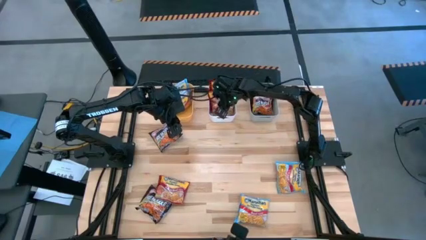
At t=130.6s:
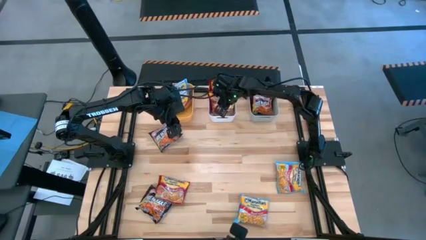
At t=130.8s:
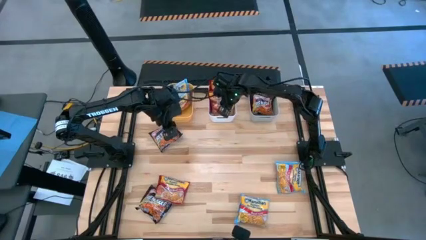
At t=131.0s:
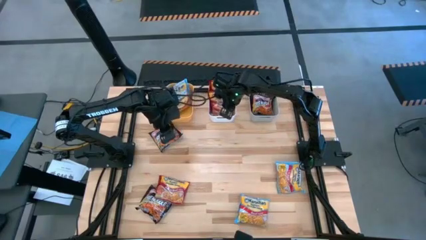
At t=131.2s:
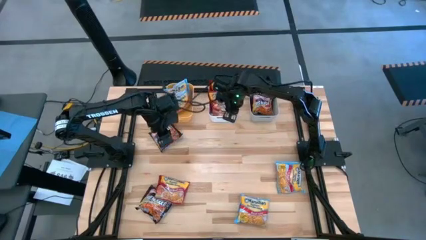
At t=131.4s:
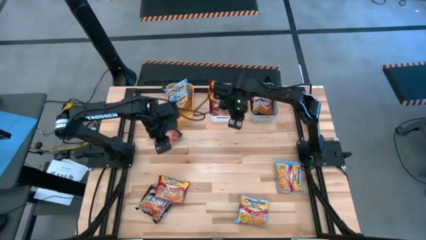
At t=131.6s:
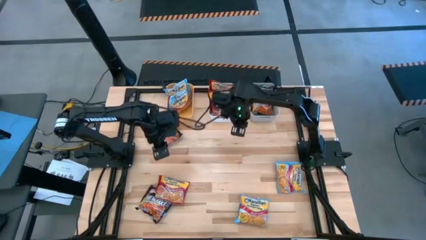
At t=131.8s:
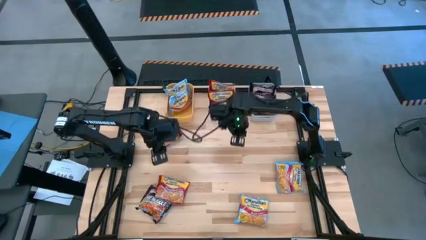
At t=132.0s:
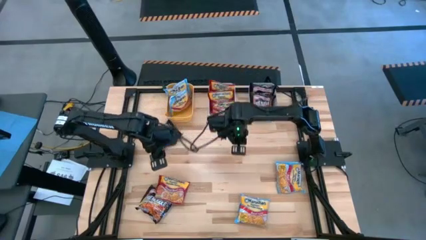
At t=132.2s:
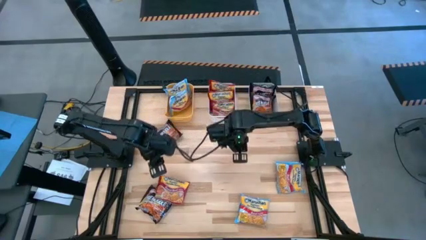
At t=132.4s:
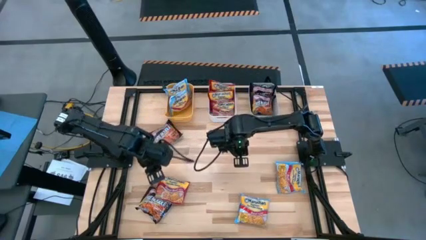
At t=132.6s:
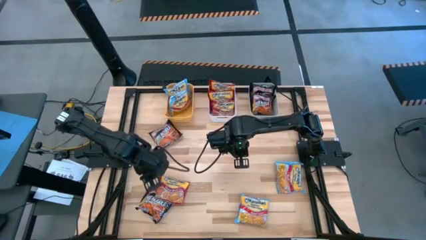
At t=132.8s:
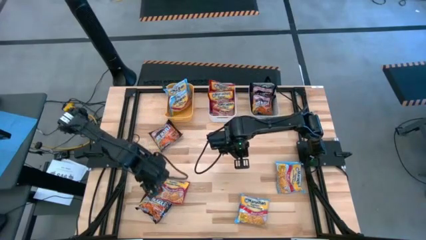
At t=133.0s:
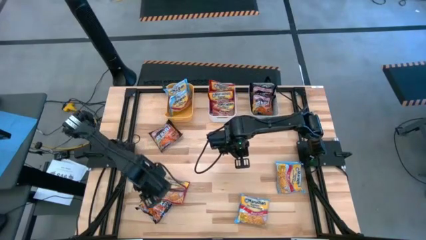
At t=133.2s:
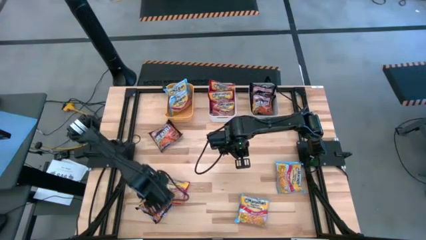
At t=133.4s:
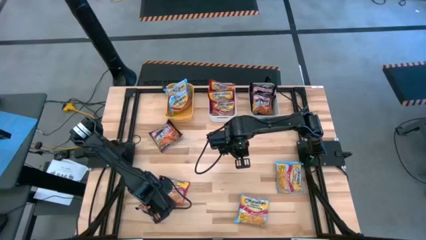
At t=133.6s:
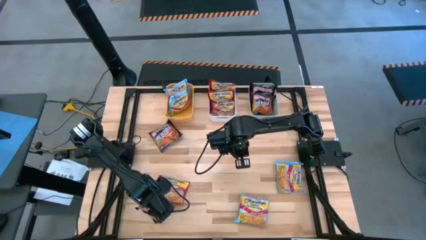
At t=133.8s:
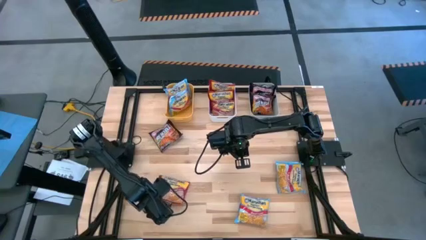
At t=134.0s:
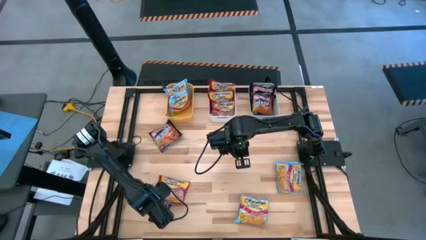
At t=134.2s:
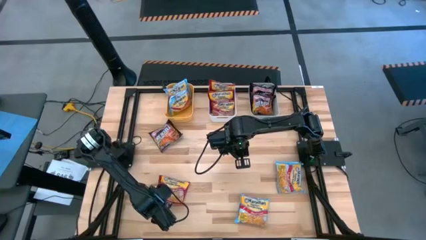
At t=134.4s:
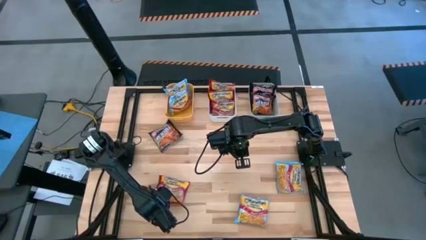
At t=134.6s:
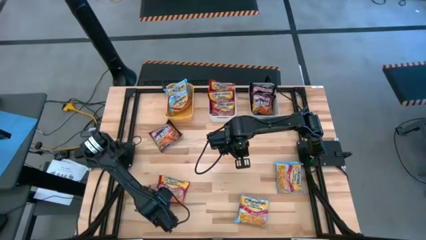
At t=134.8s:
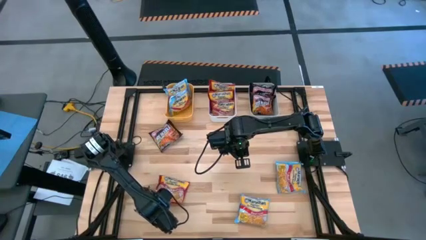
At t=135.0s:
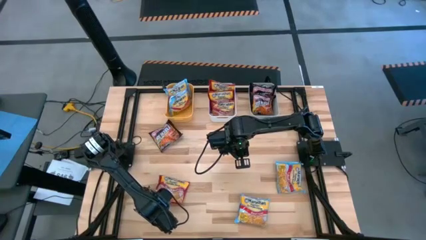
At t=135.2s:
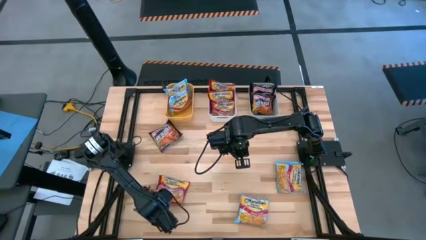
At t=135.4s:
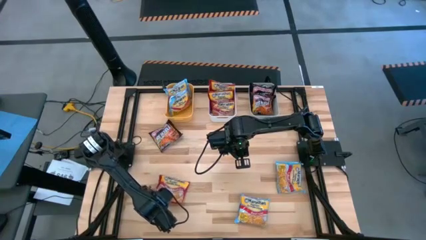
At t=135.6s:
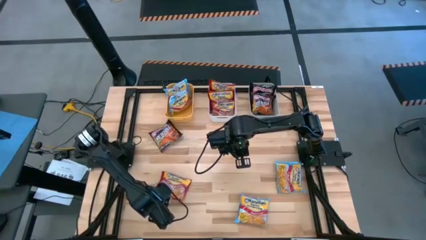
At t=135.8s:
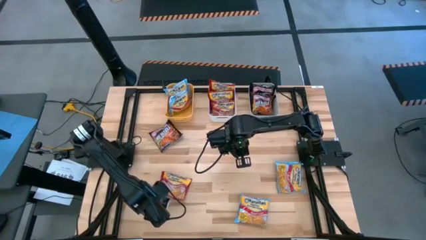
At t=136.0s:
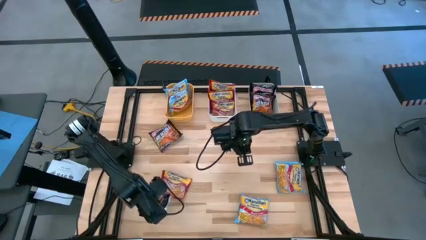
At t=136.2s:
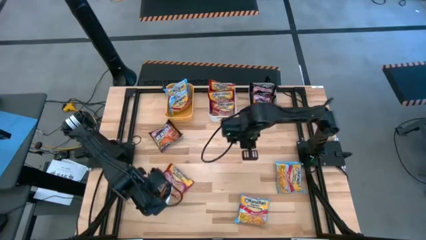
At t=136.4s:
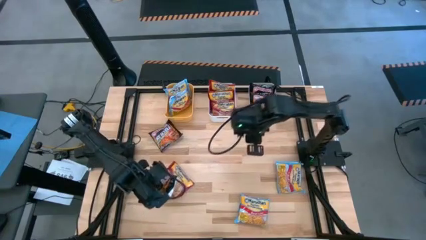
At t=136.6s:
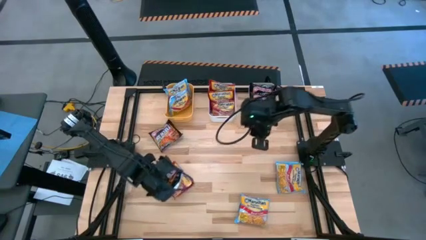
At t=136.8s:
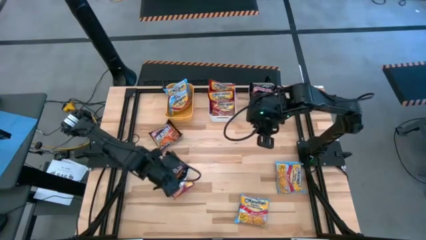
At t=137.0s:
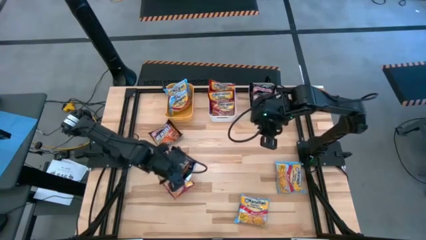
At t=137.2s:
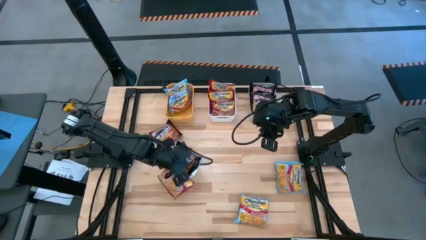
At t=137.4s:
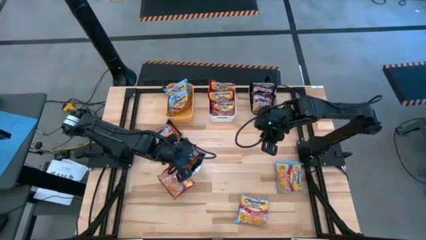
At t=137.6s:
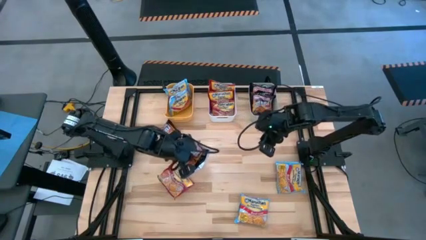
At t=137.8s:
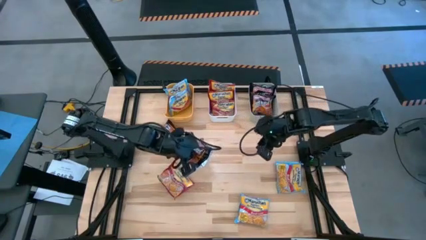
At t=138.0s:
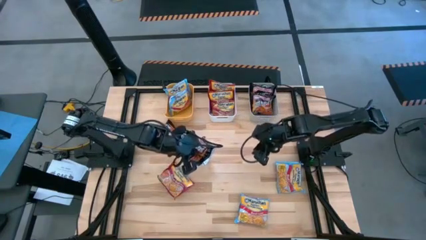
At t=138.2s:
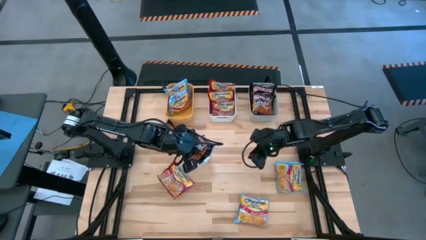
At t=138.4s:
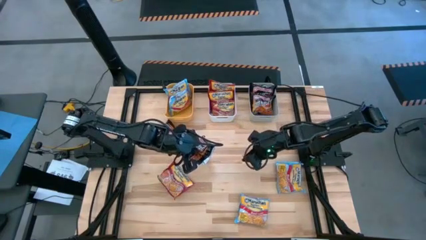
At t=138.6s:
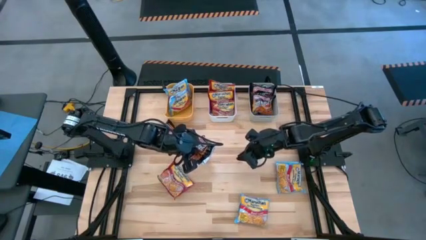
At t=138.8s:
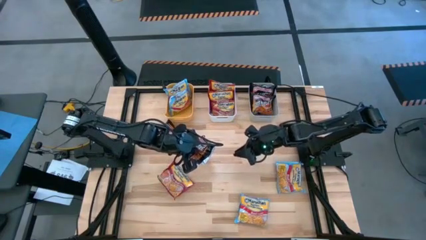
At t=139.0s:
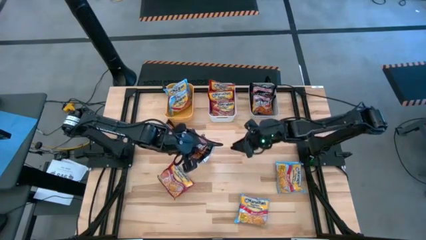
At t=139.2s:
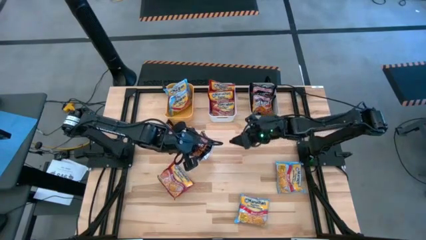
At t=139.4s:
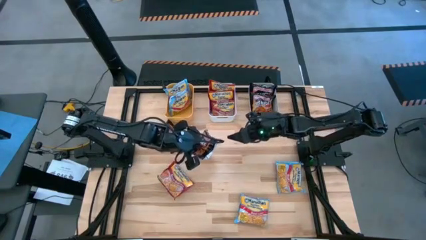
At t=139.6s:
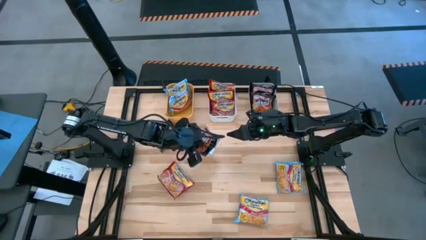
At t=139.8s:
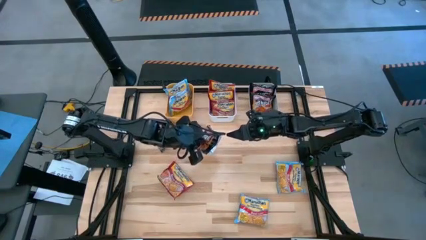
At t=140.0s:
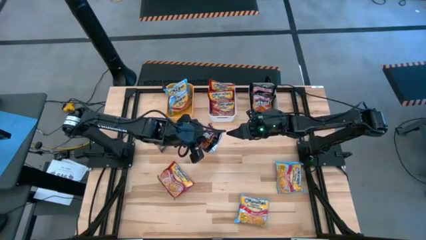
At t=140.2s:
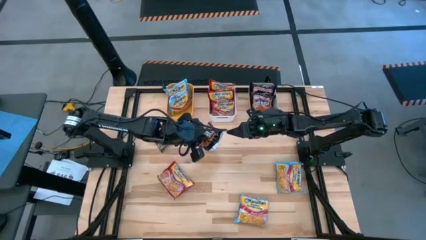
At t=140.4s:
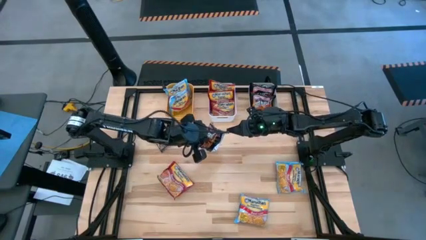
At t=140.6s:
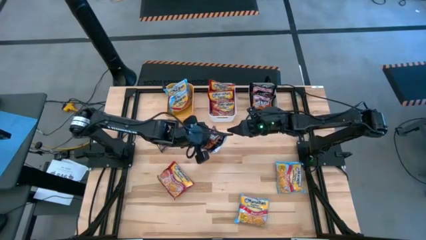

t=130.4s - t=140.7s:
Task: Sort Maruchan noodles
Put the black noodle pack into the gray bin

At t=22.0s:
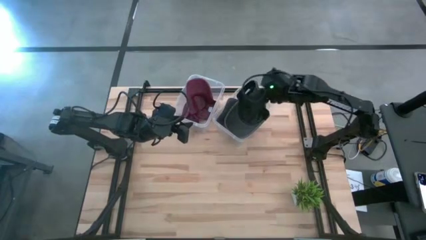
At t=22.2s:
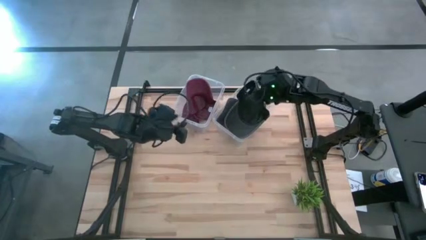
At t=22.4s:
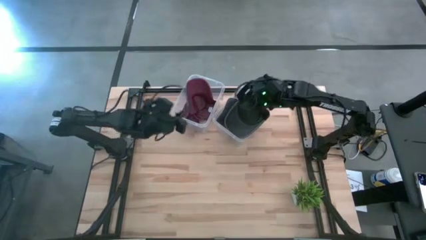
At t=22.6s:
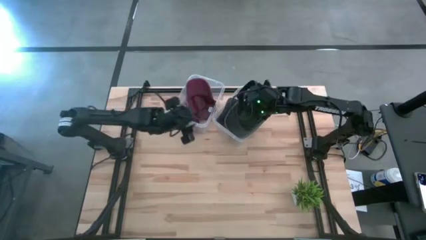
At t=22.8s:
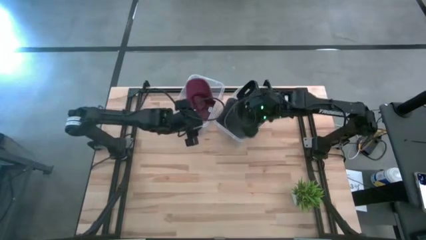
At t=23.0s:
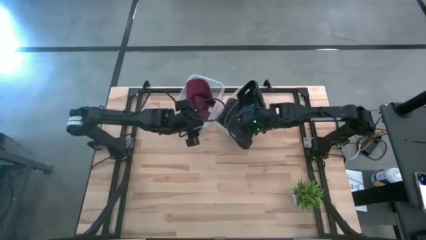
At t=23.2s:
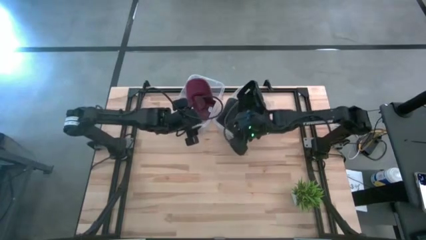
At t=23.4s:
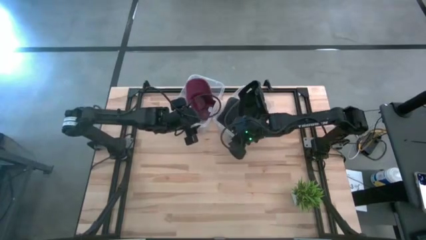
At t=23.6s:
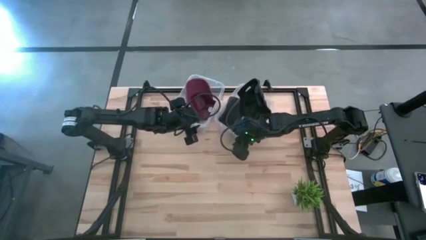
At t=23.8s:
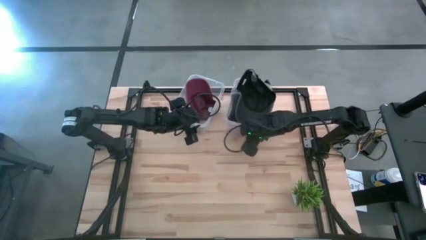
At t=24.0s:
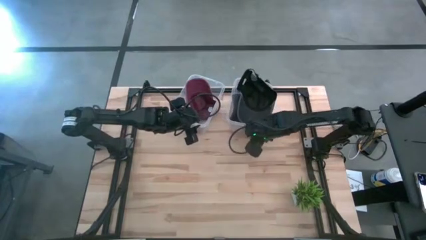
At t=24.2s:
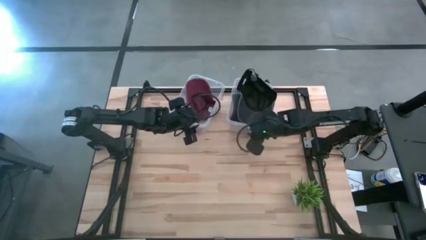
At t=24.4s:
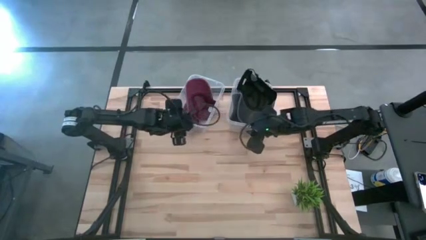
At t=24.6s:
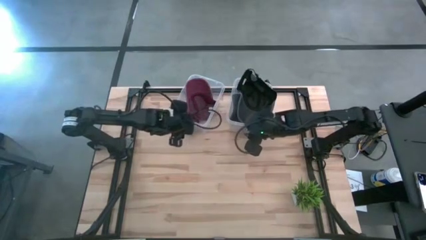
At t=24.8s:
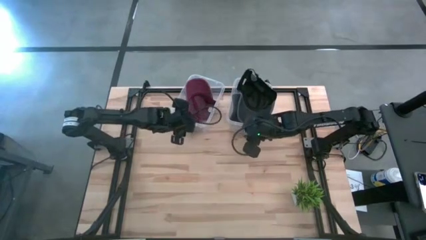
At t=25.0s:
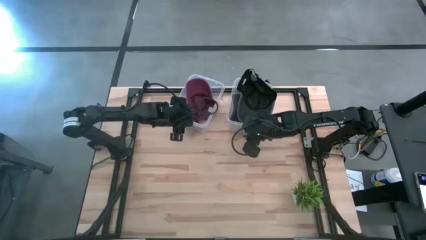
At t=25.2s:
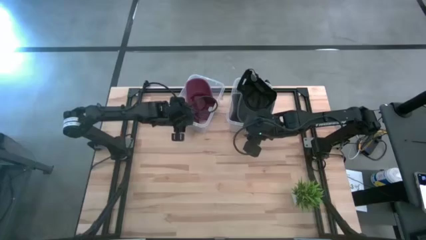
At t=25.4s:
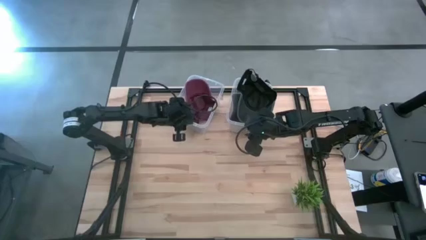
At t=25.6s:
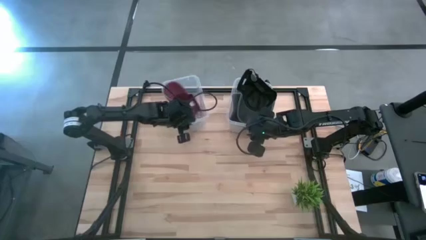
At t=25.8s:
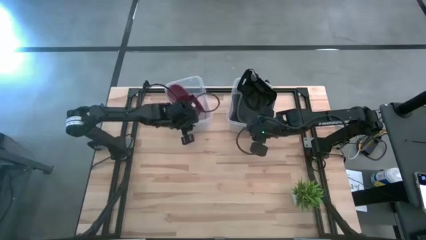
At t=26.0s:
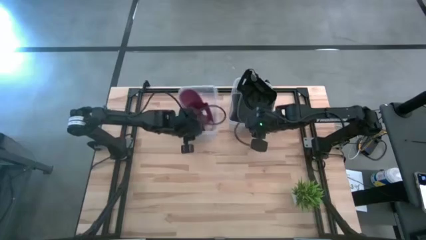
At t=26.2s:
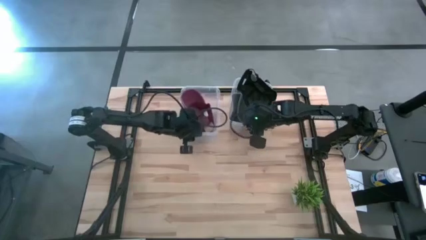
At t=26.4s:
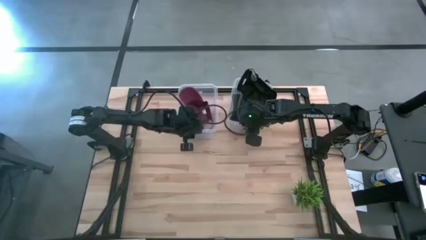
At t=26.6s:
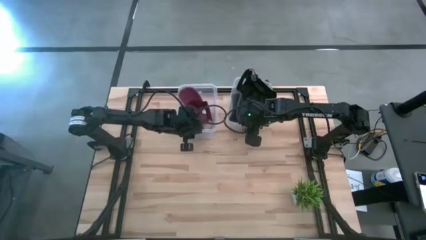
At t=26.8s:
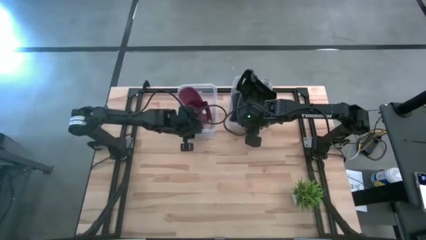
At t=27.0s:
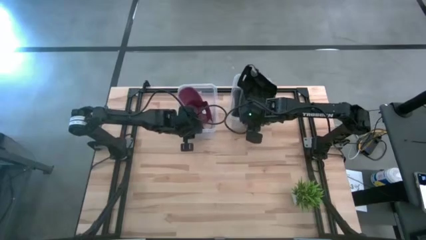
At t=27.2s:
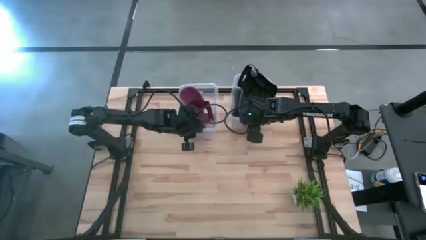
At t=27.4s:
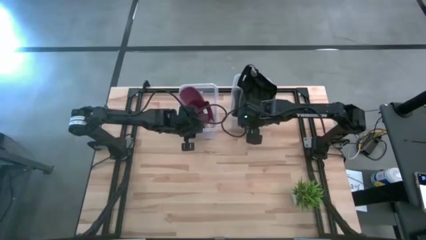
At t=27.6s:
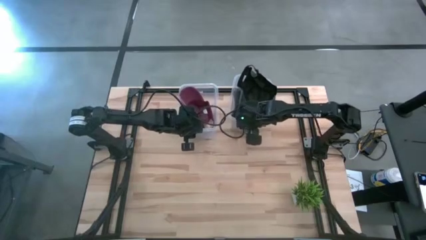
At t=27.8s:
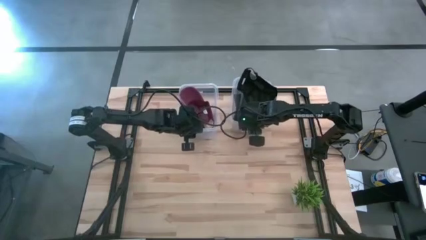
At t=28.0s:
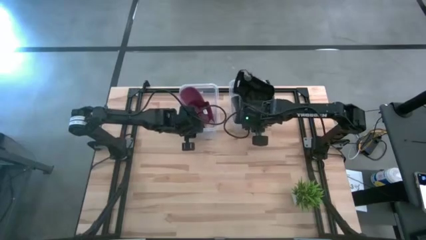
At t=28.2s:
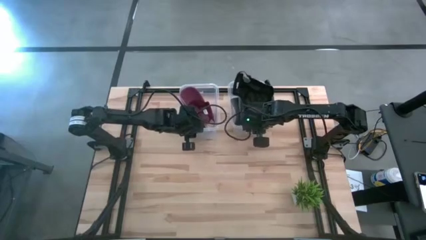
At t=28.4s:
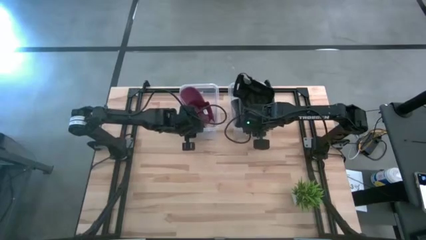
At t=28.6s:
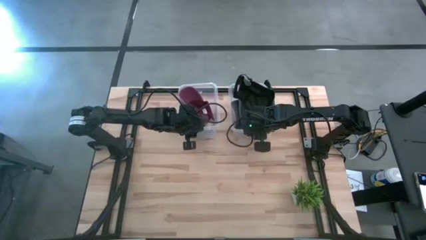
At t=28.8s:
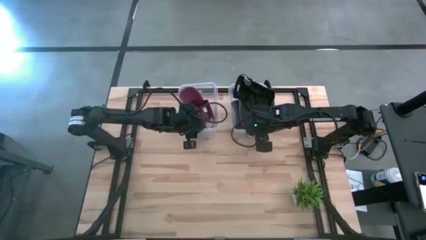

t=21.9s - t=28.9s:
Task: Pick & Place hat
Adjust the transparent bins
